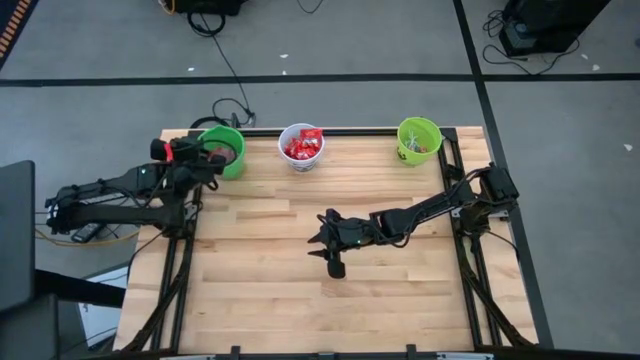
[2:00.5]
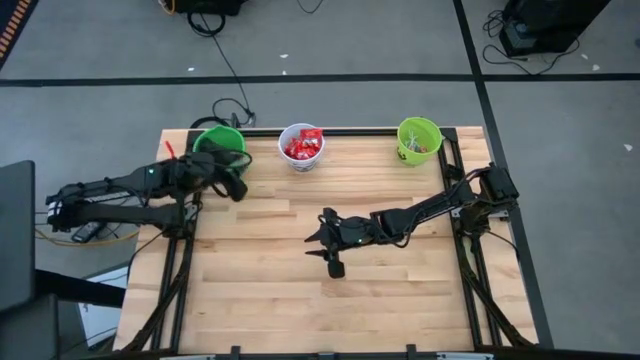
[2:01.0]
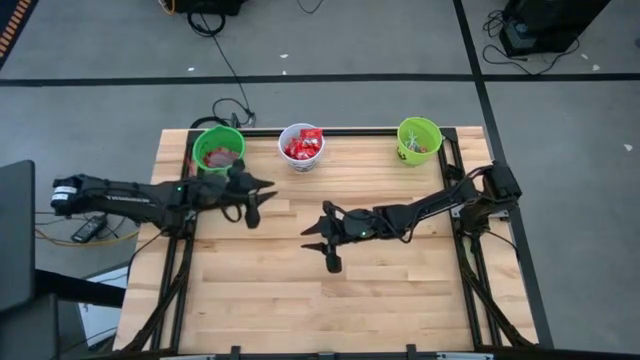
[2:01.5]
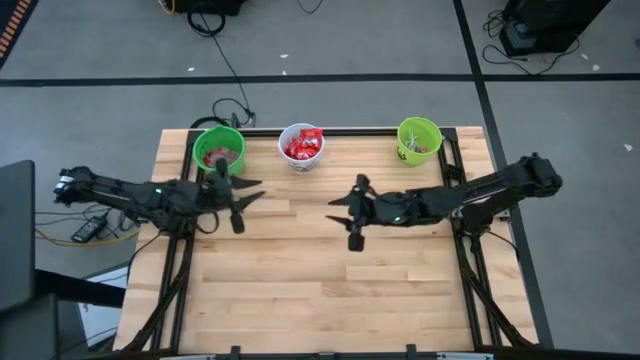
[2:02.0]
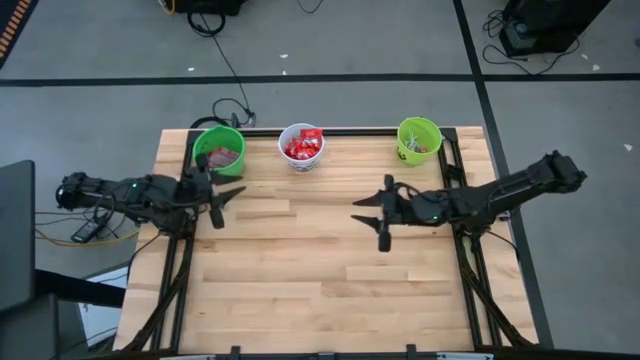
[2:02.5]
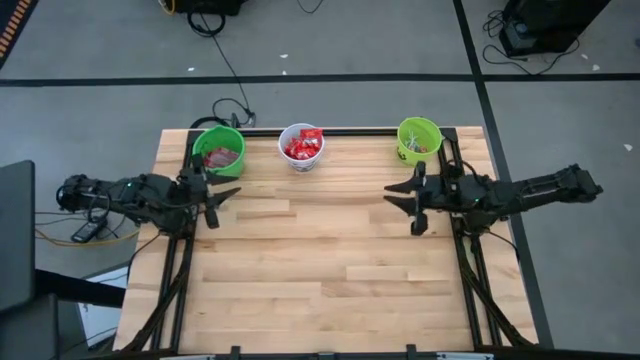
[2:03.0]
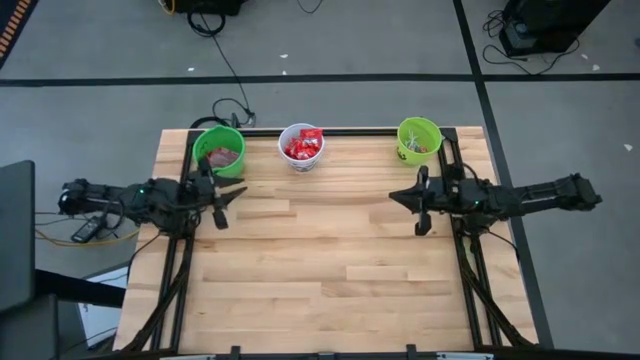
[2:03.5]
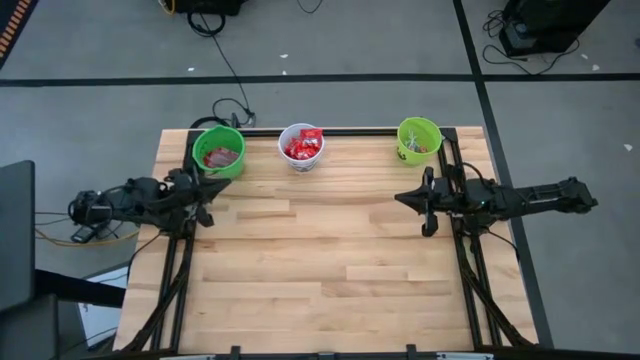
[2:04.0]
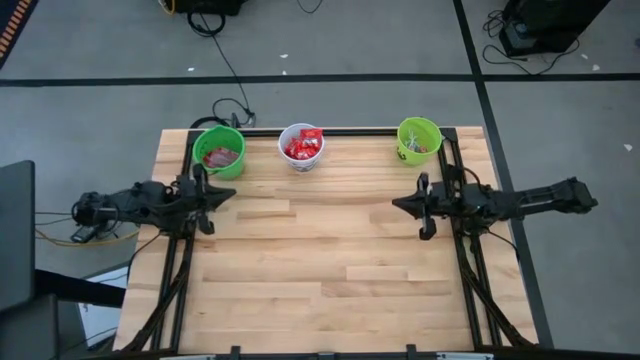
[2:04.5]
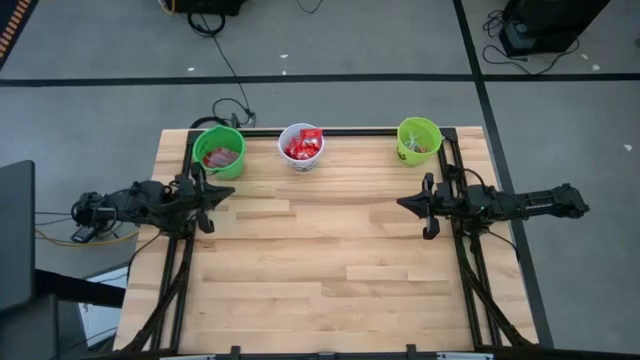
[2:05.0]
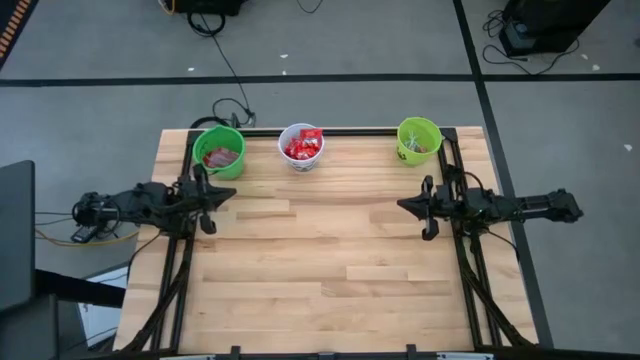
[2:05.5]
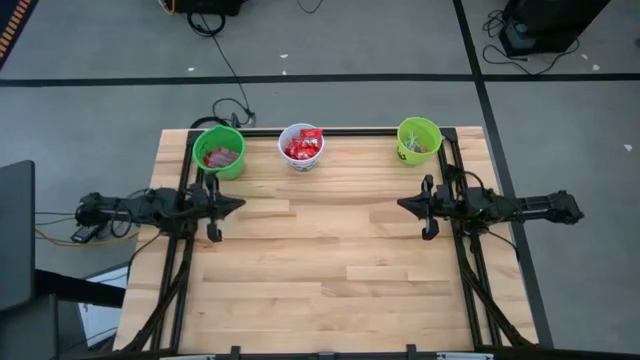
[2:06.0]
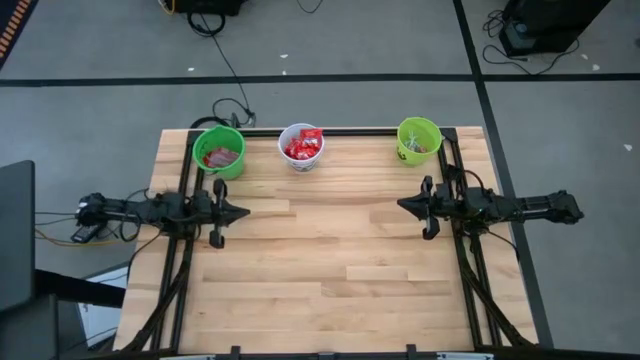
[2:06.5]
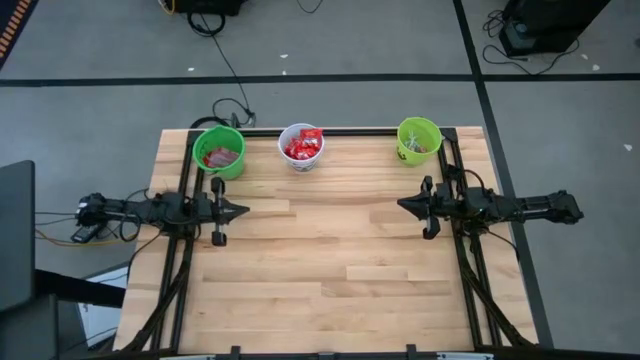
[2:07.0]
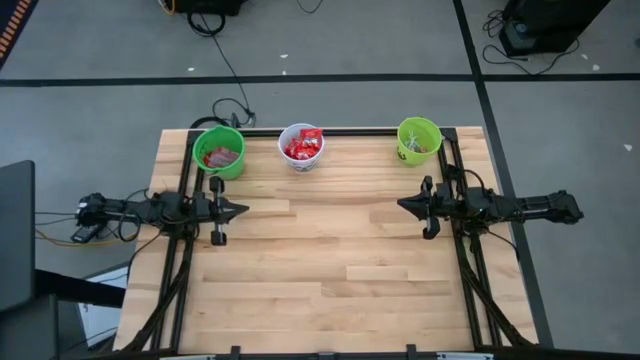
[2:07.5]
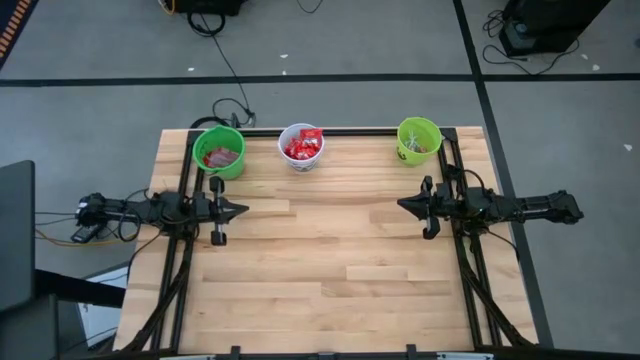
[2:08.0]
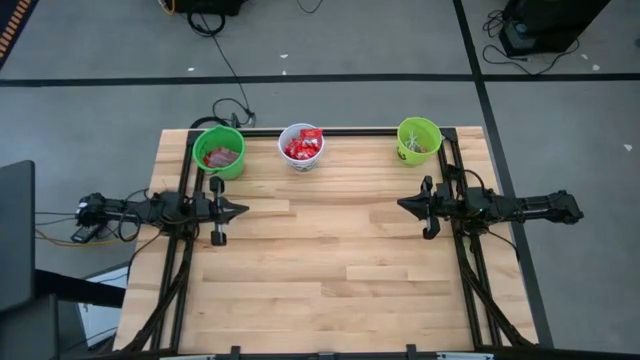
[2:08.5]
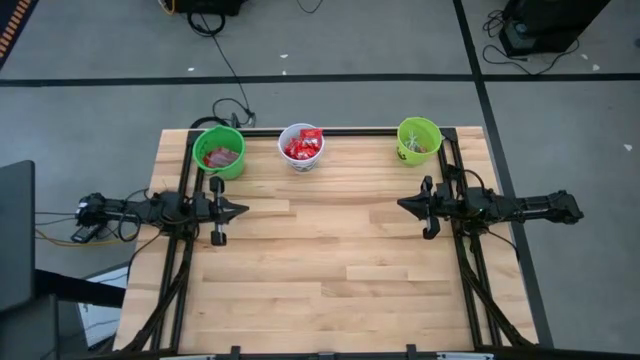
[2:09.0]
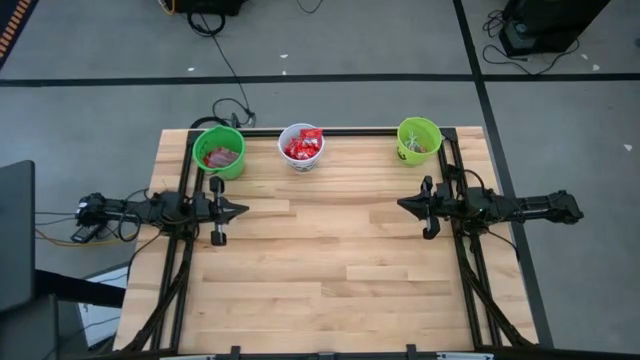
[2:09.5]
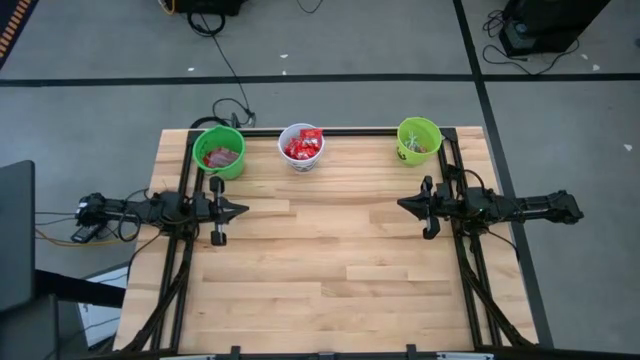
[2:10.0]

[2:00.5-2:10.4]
Task: Sort candy by brand, put in halloween buckets
Return to Home Position

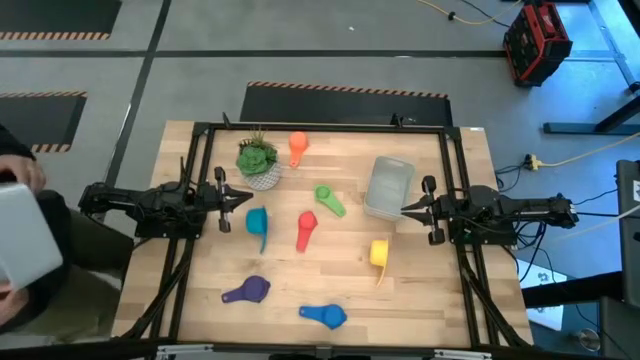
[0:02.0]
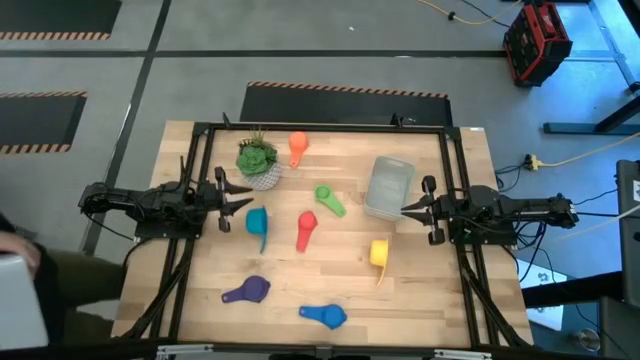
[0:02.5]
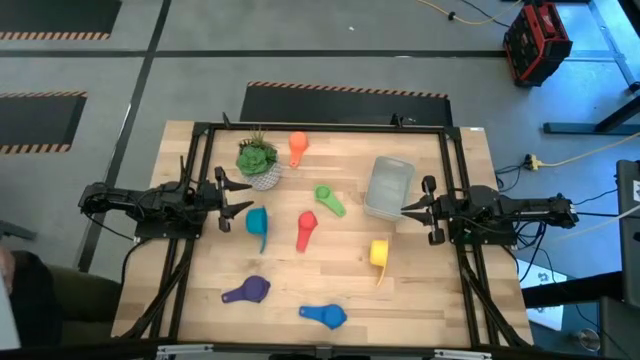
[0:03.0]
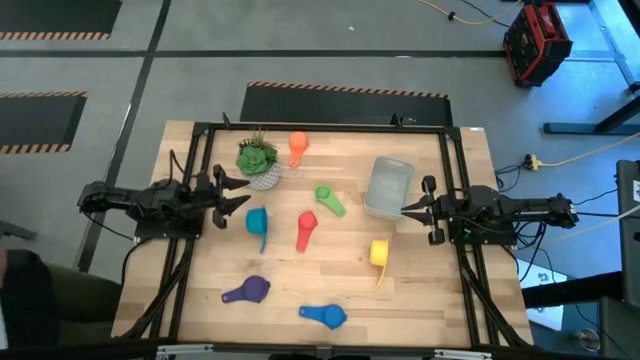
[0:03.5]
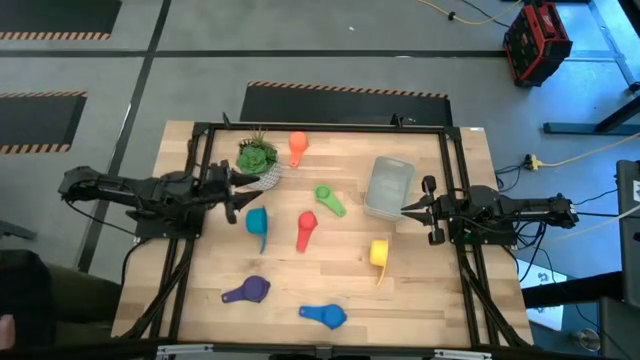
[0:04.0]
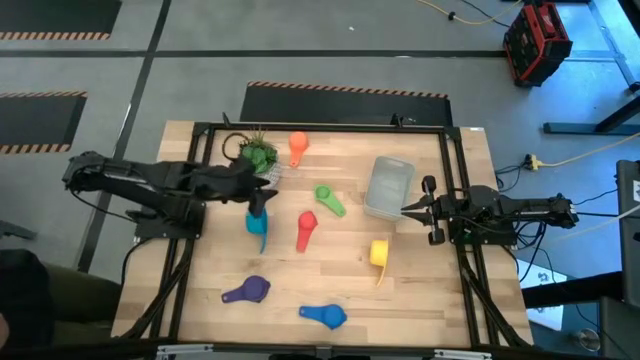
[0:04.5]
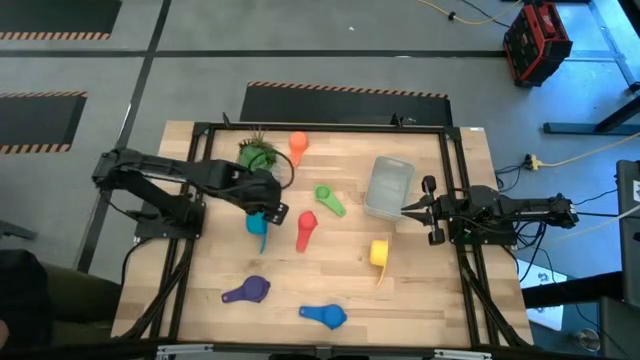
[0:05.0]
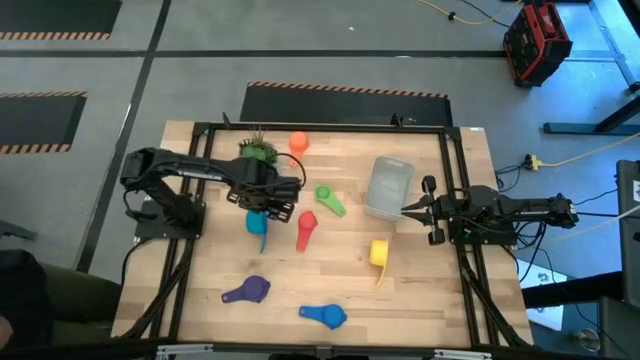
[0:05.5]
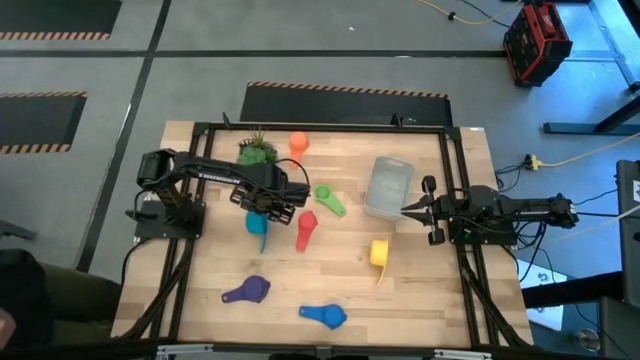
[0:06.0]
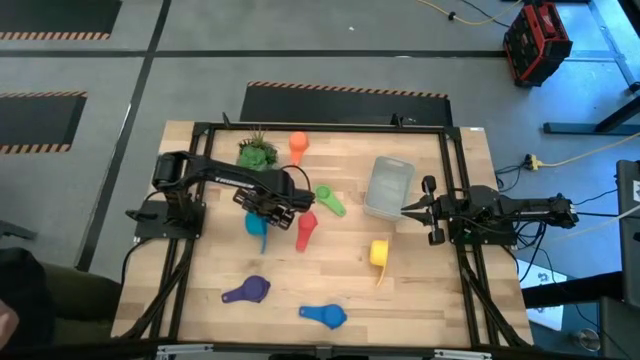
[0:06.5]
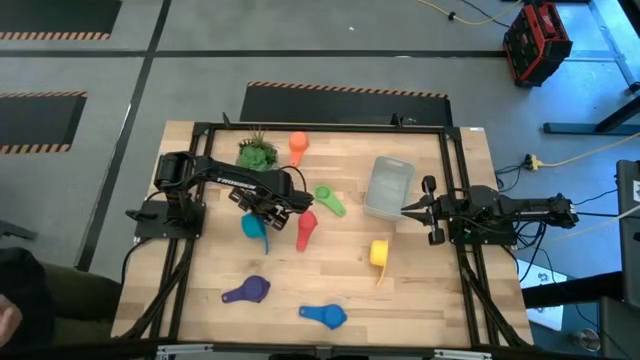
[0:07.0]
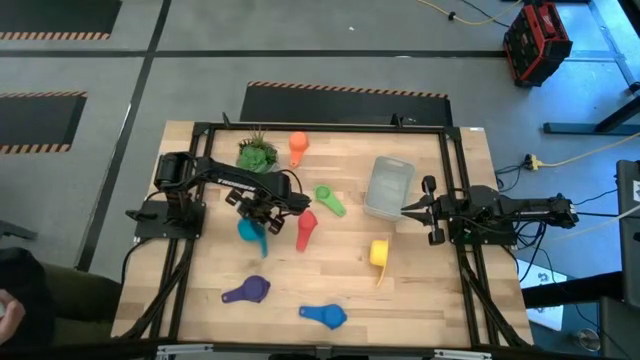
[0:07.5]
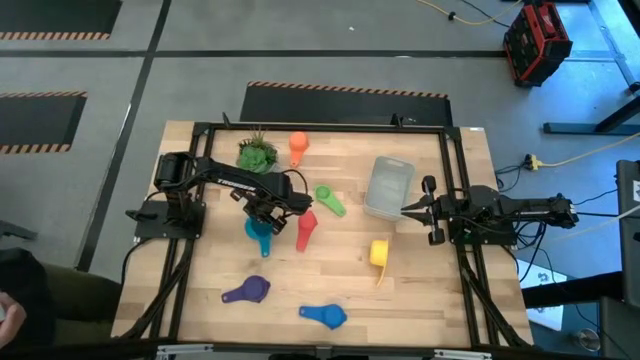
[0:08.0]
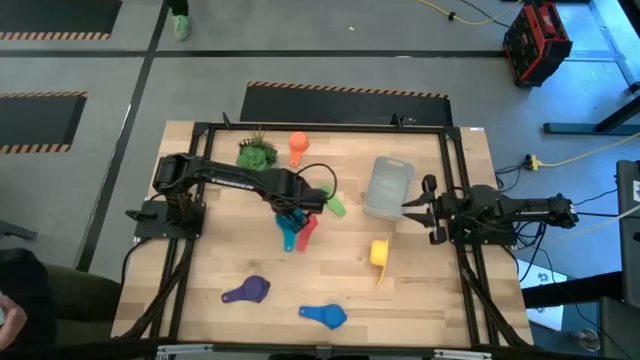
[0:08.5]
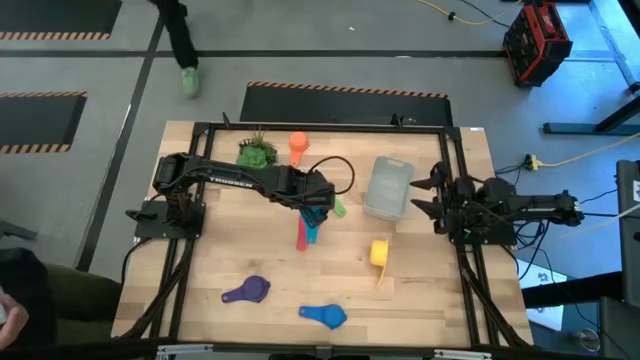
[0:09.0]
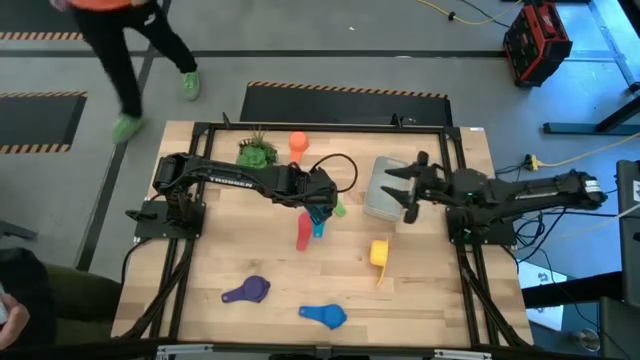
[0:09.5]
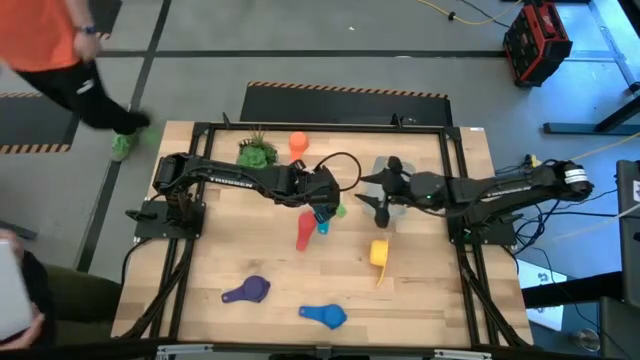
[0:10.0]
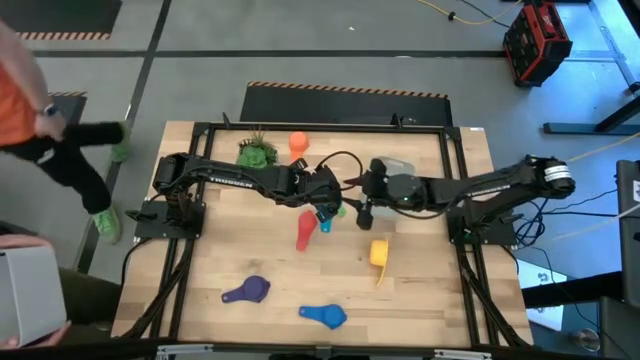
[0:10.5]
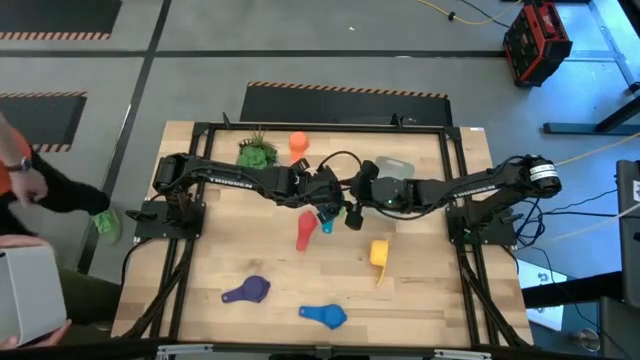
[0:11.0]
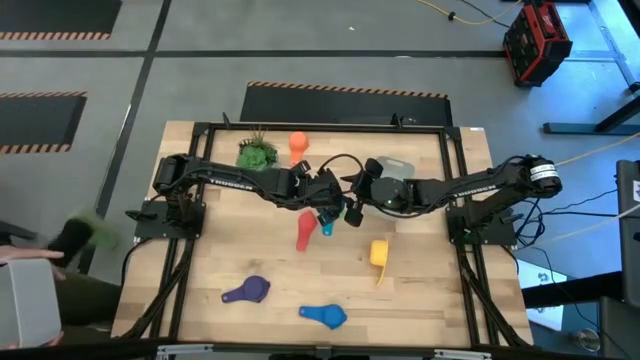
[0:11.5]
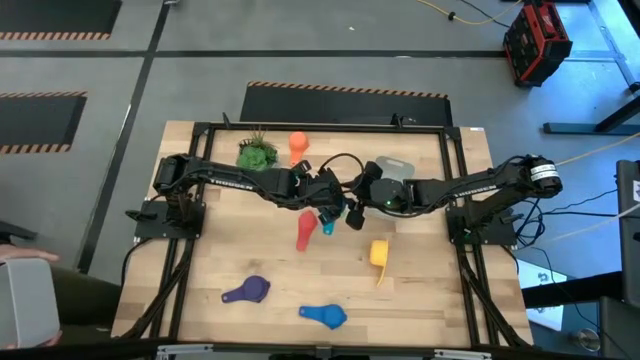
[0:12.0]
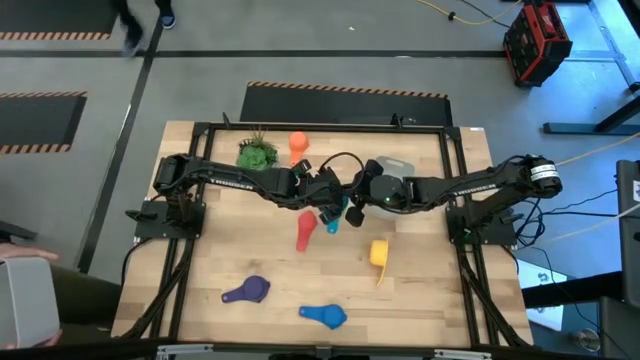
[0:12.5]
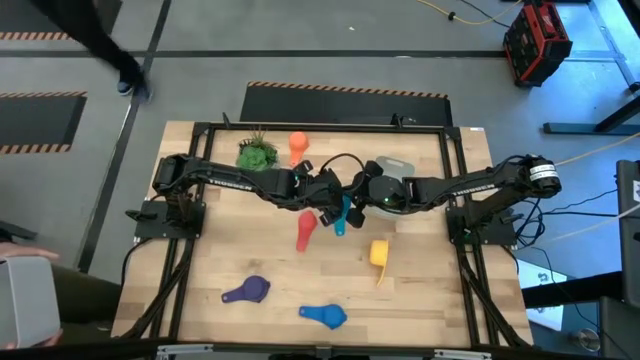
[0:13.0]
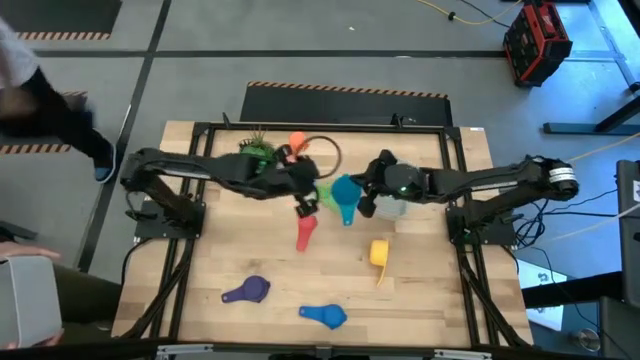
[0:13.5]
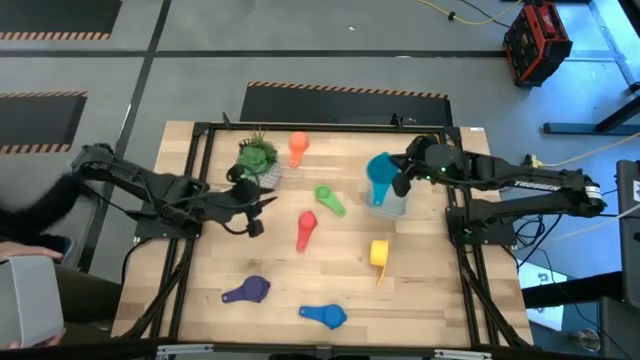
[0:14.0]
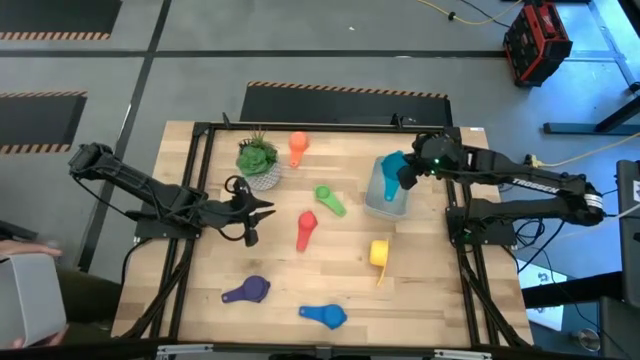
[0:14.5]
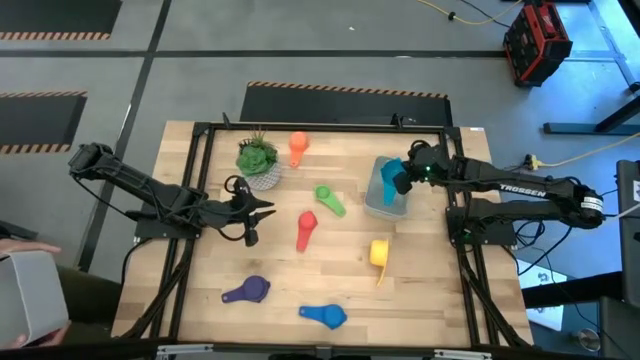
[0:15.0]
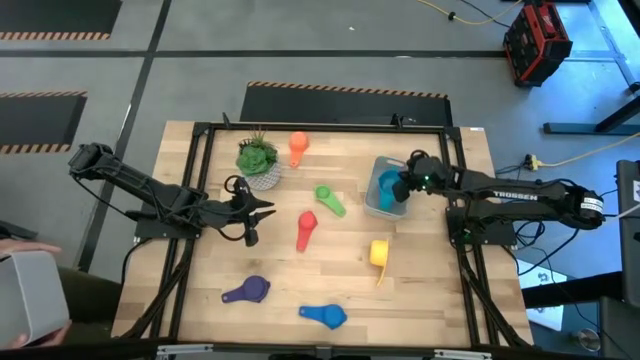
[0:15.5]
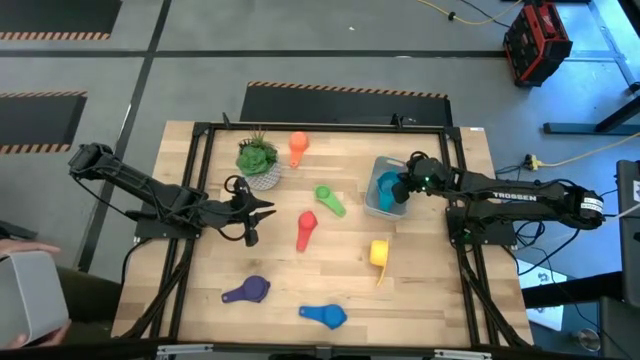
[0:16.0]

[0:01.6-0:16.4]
Task: Nest measuring cups in basket
Put the light blue measuring cup into the gray bin
